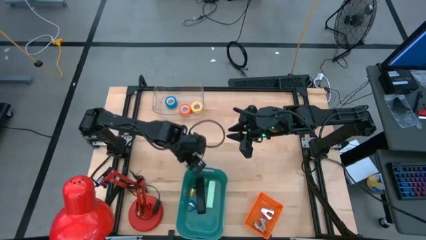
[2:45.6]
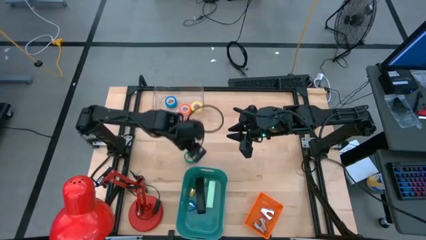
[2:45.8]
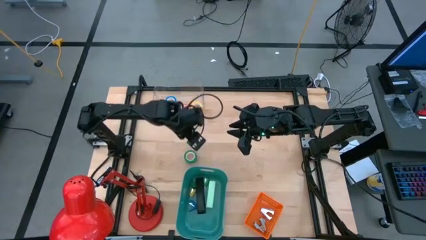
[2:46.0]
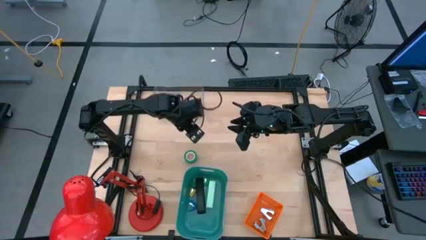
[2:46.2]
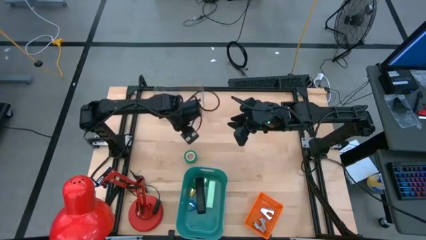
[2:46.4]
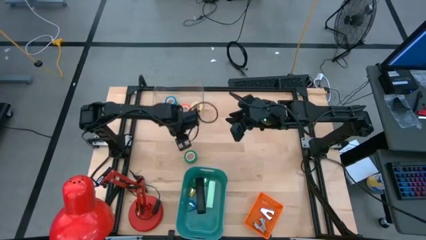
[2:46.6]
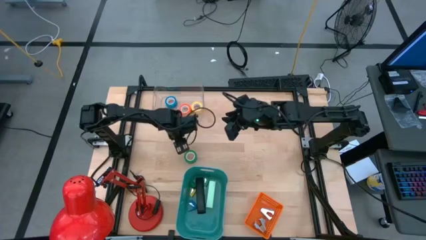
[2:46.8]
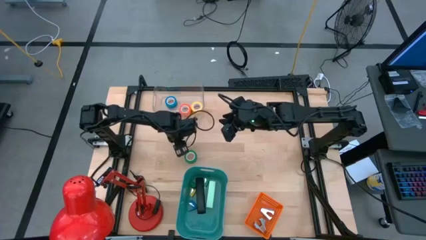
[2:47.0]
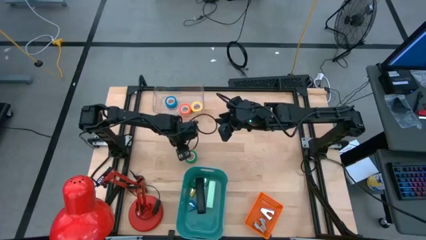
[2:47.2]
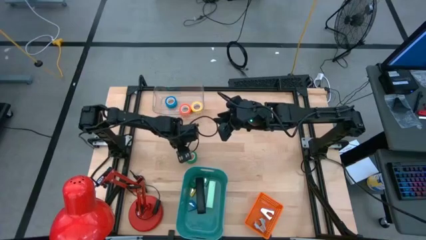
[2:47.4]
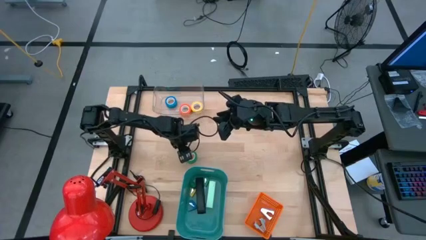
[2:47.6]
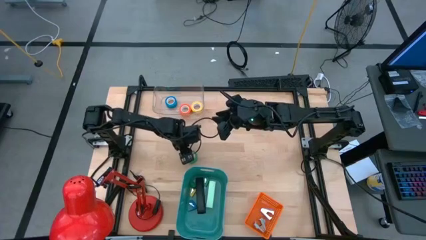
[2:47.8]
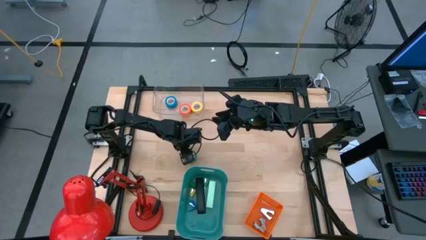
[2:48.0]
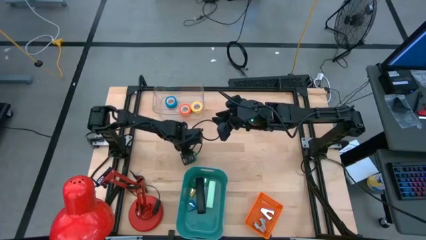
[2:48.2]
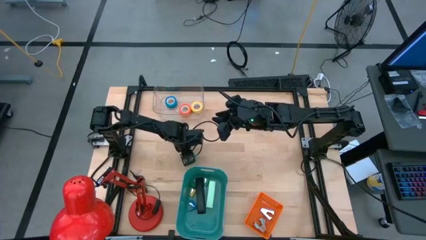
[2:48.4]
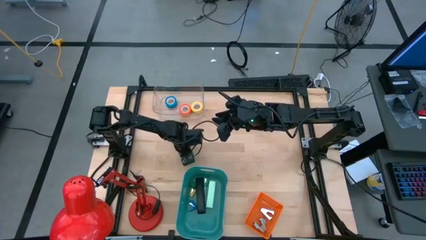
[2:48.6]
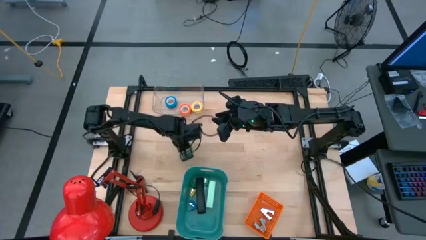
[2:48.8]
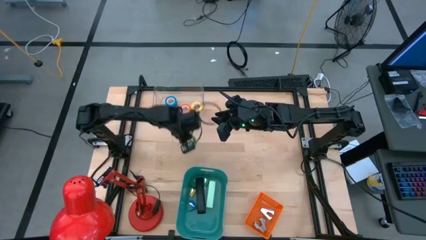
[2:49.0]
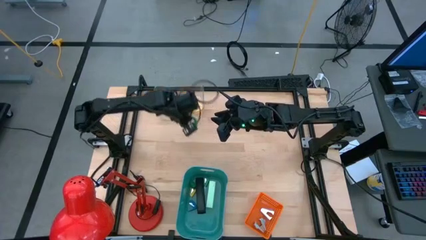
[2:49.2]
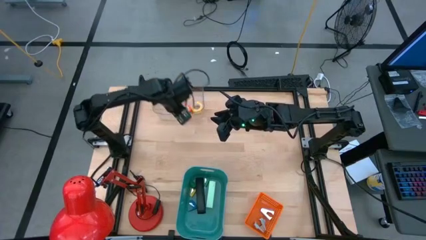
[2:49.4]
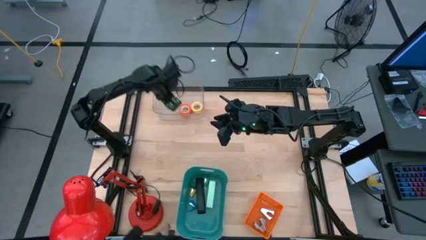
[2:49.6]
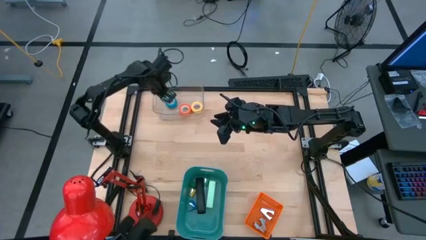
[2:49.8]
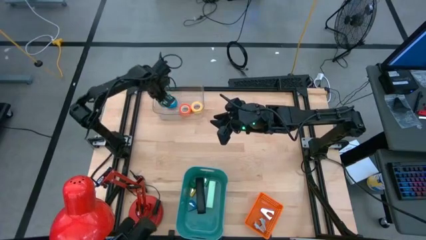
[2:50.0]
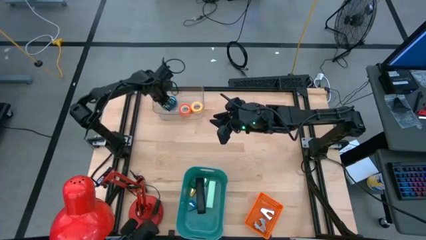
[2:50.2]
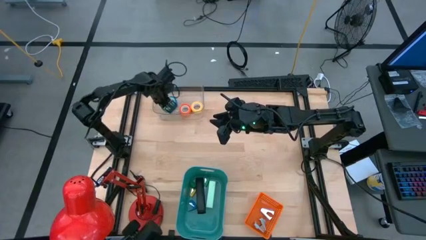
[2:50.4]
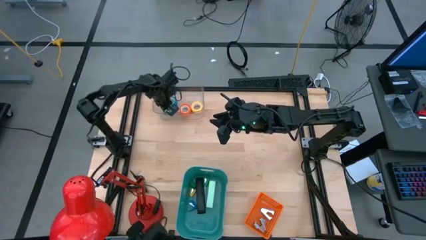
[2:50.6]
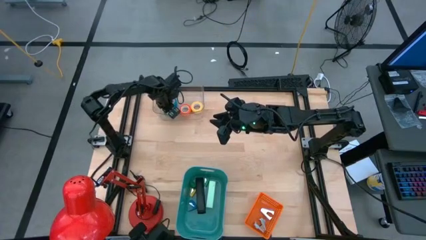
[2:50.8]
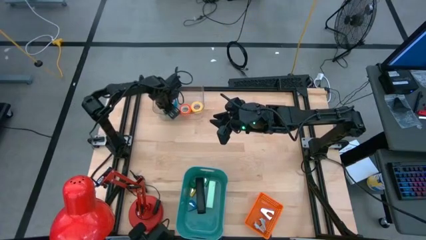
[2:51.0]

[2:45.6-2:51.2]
Task: Pick and place Stapler, Stapler remover, tape
Put the green tape into the transparent bin

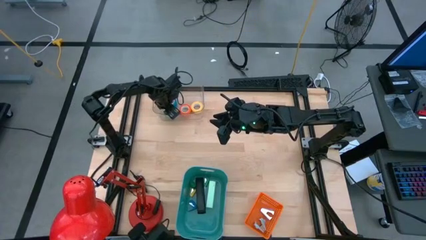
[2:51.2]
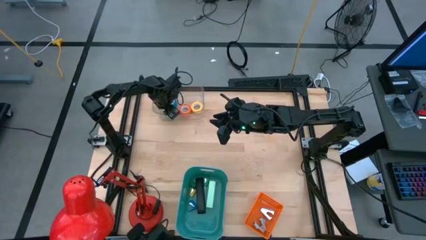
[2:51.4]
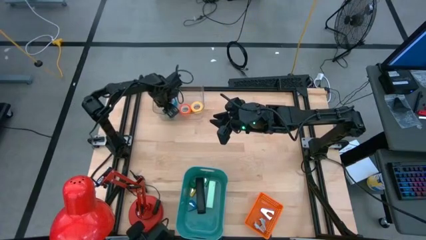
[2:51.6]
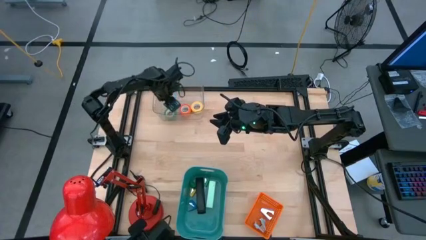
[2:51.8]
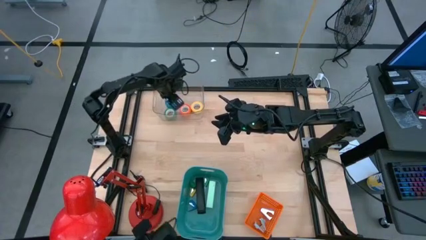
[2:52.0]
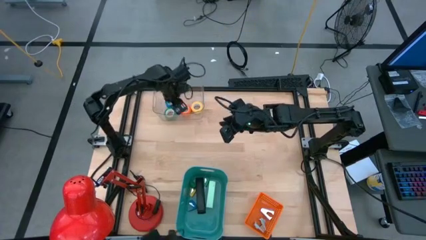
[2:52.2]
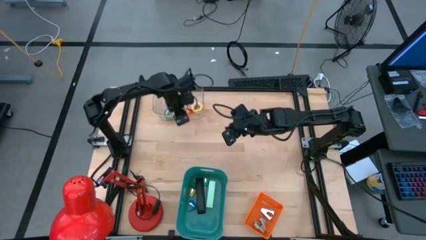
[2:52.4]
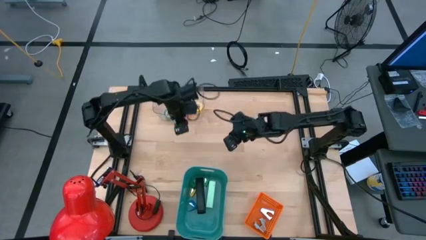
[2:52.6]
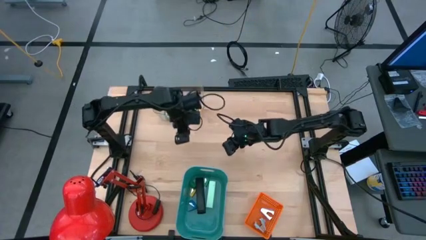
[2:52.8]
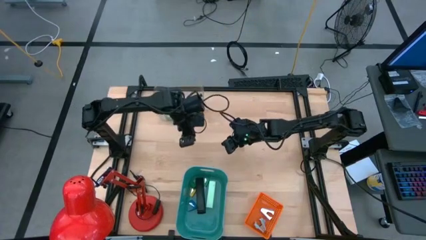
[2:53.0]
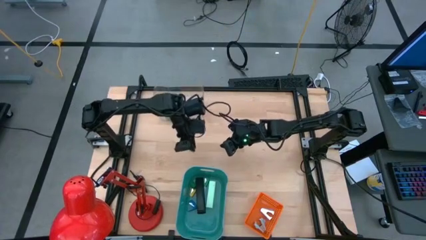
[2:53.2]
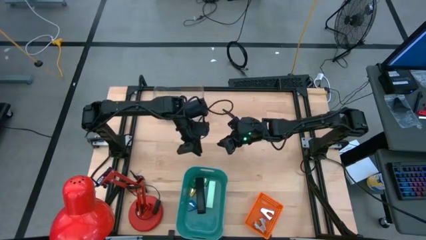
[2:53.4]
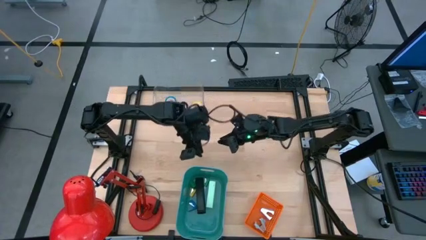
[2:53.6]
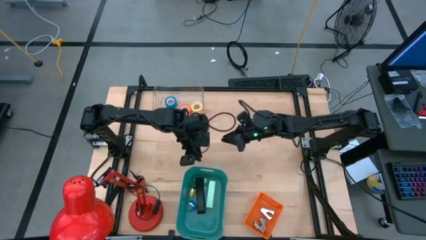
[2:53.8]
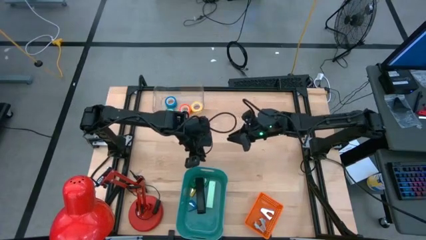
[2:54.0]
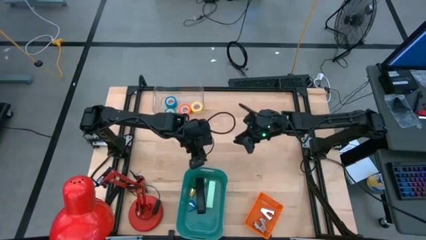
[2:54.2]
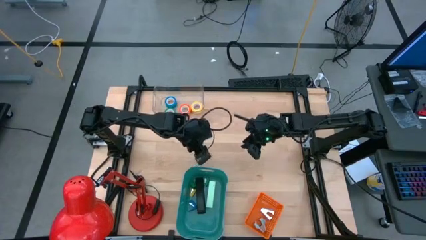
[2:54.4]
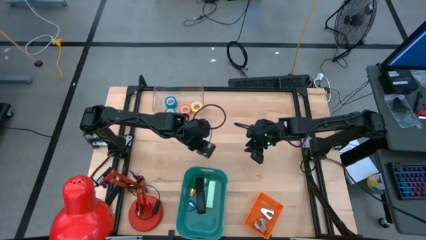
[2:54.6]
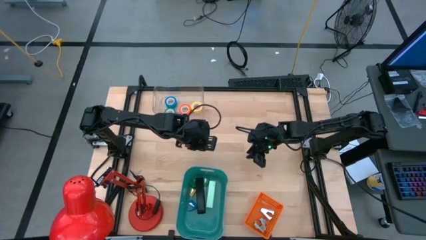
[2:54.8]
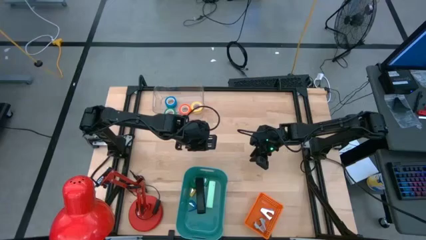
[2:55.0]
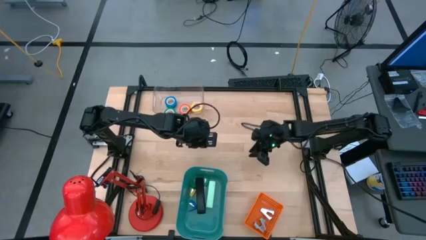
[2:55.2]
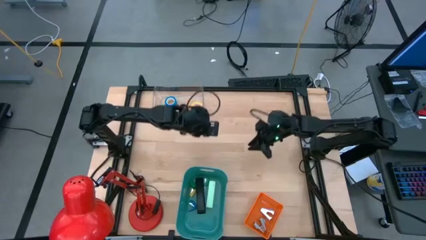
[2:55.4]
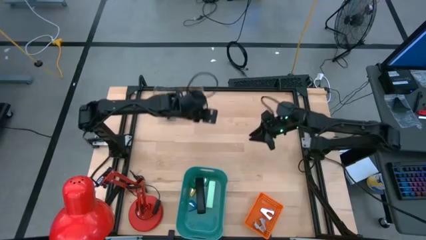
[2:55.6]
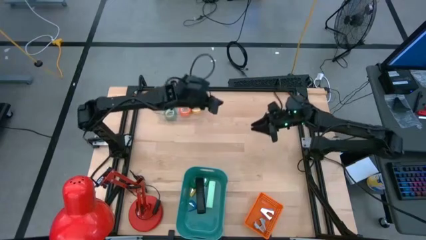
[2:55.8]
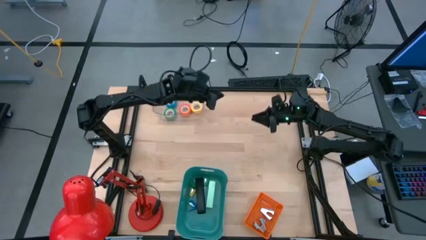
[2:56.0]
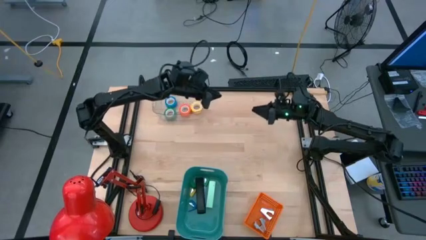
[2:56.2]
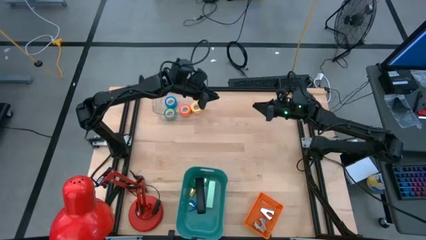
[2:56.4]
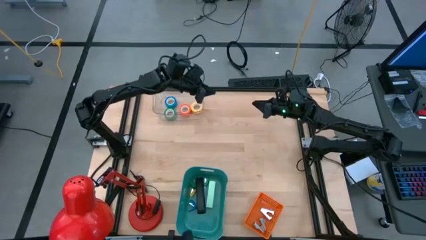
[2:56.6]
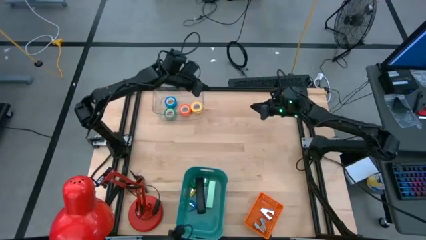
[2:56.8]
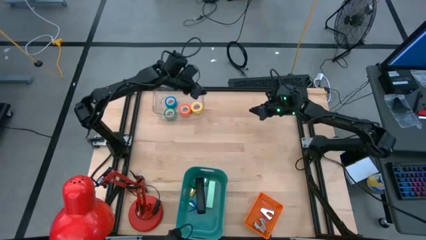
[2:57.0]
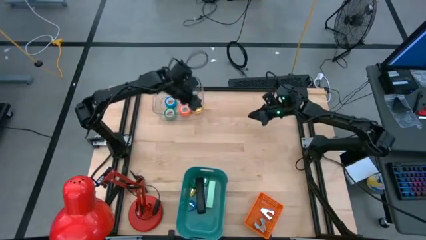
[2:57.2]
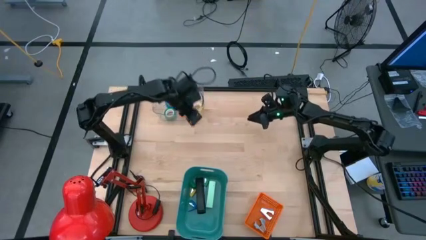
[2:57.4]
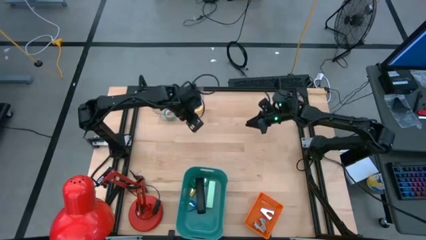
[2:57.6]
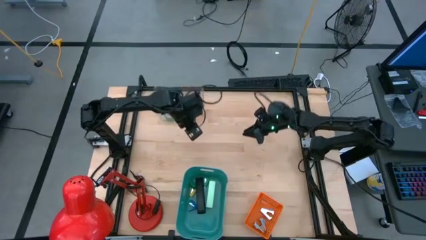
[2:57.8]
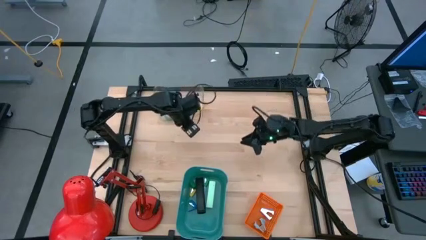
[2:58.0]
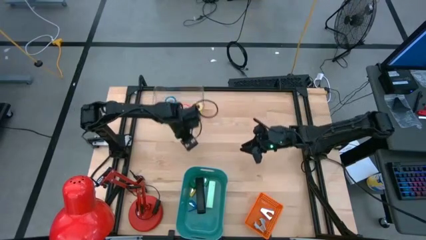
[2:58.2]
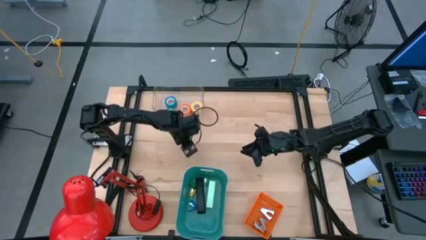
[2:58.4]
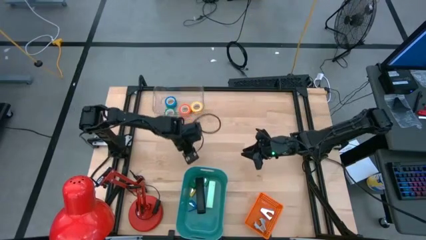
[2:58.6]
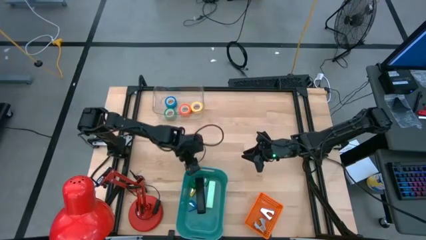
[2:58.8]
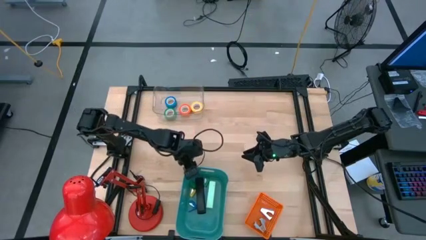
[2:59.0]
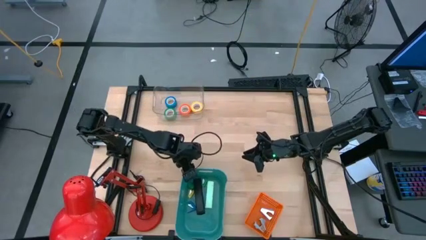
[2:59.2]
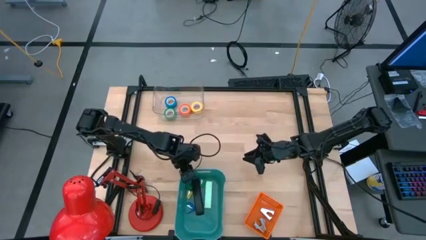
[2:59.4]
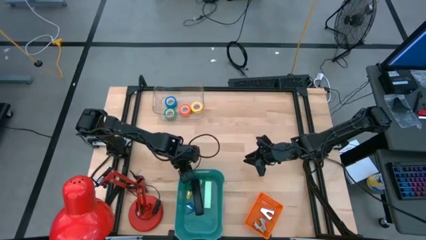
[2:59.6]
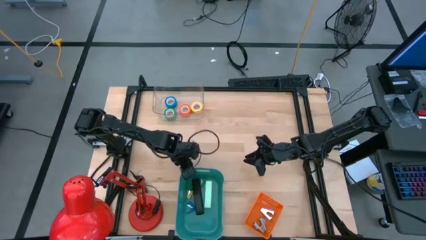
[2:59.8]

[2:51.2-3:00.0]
Adjust the green bin
